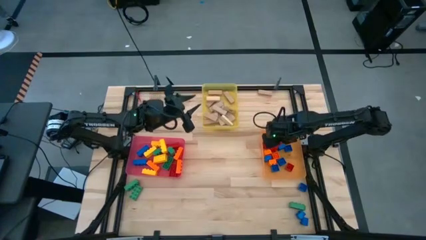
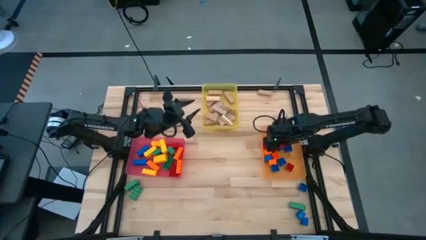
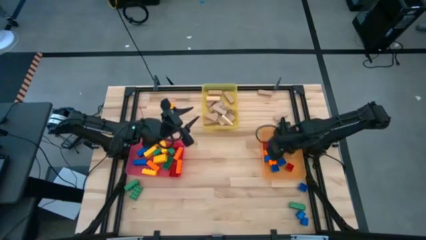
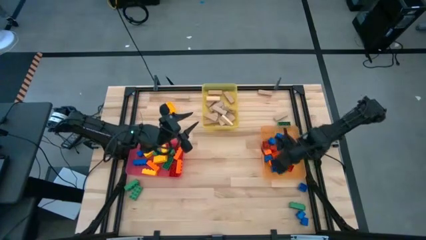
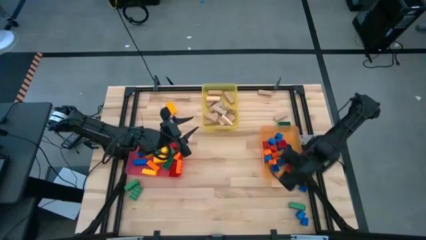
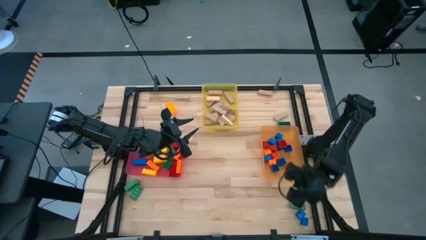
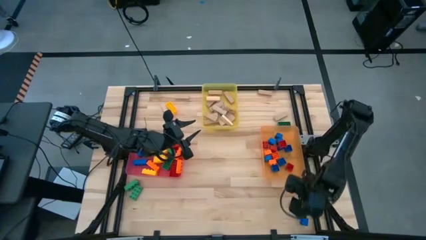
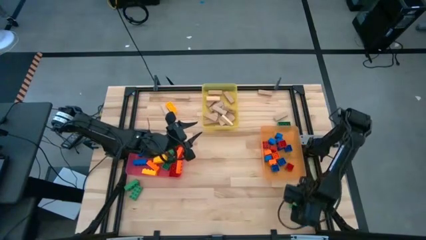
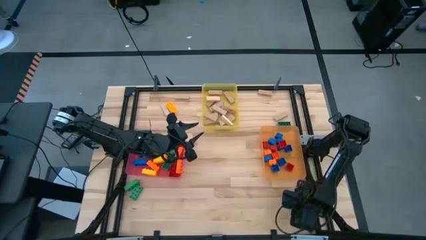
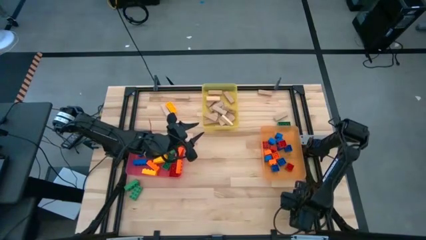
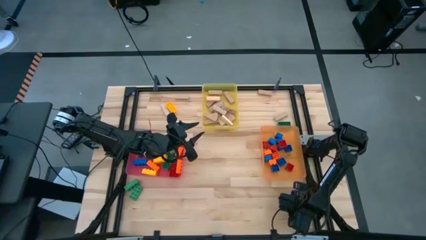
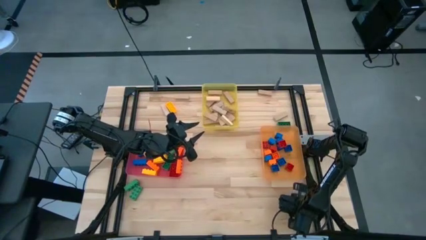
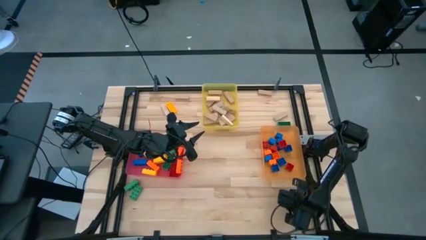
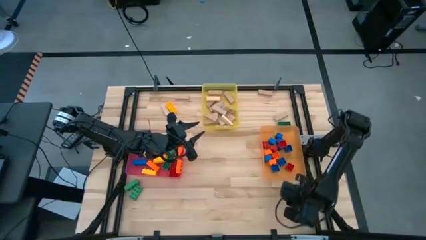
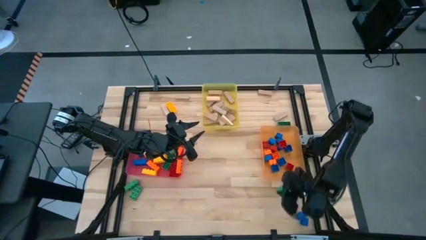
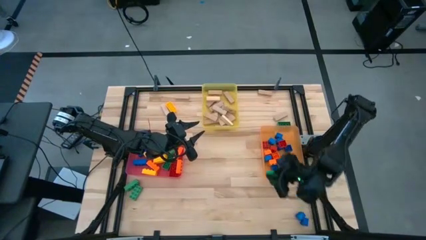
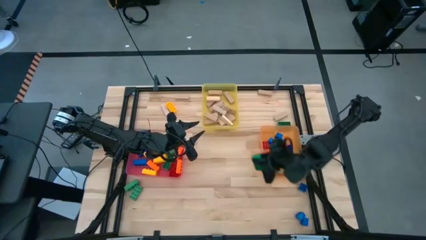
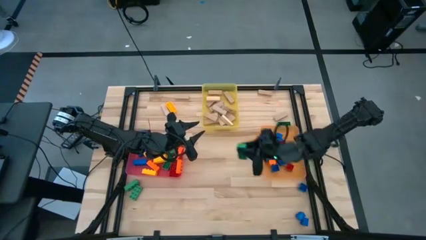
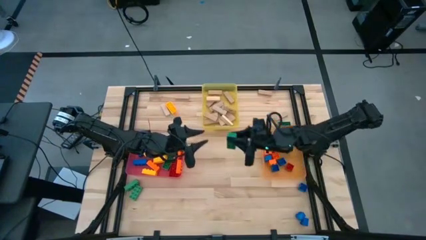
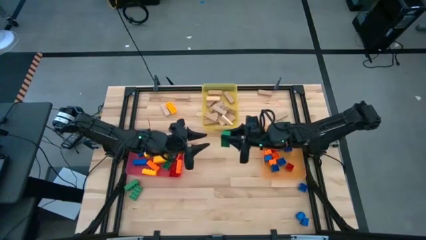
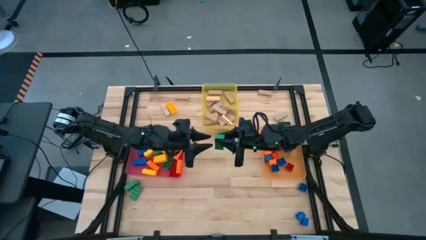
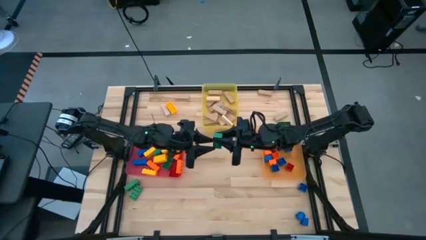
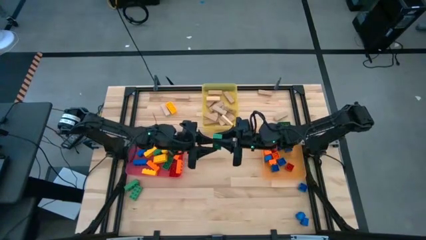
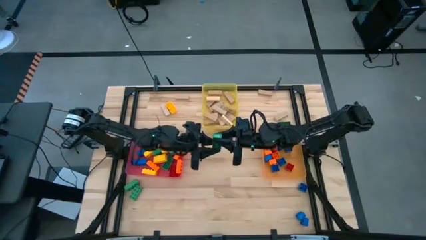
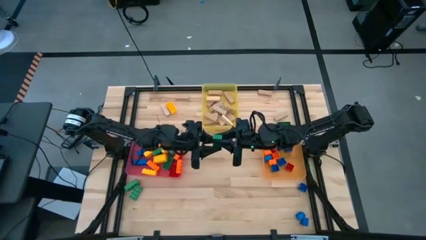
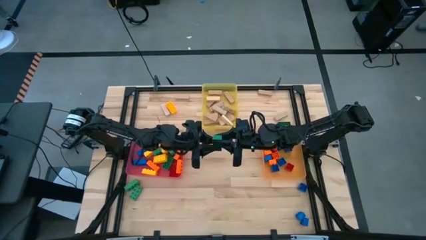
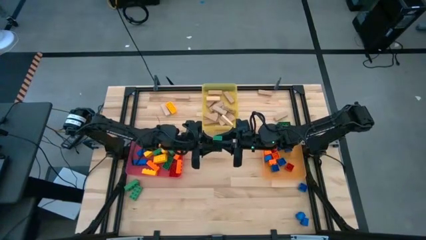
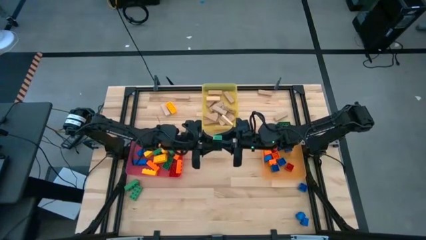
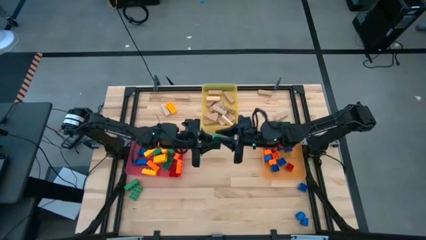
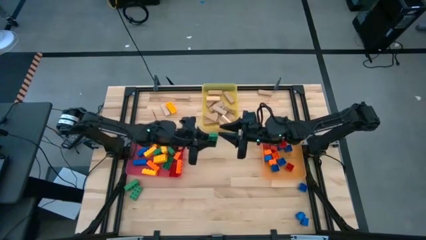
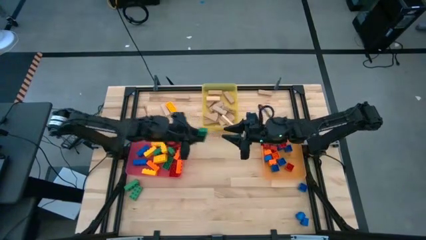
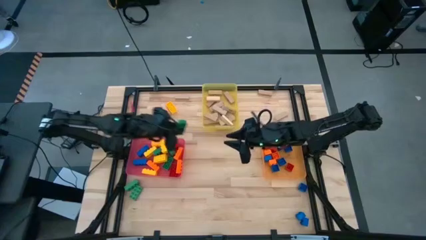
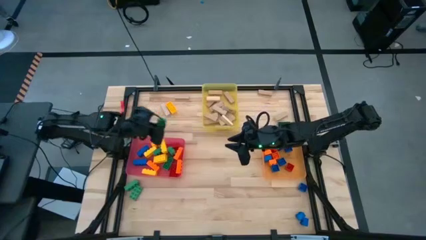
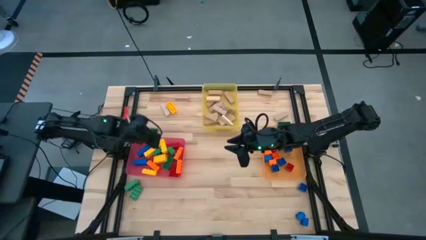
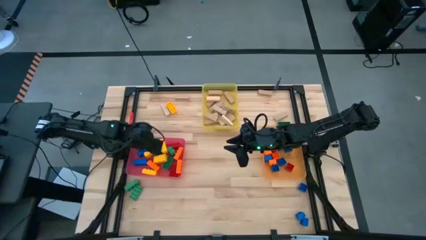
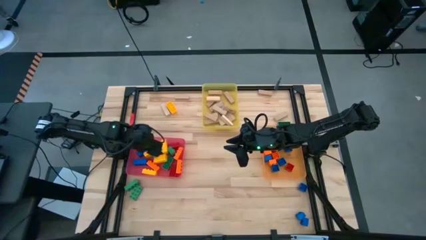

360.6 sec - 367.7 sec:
Task: Sort blocks by size
Put the 3 stud green game piece into the pink bin

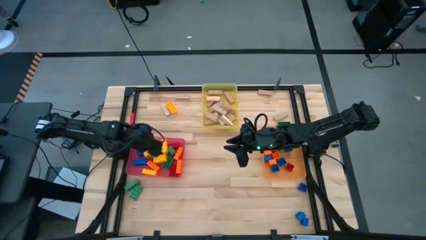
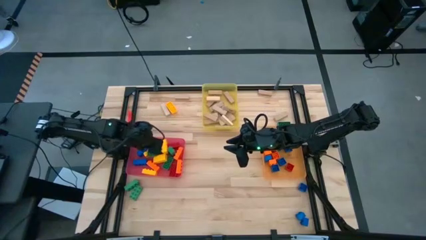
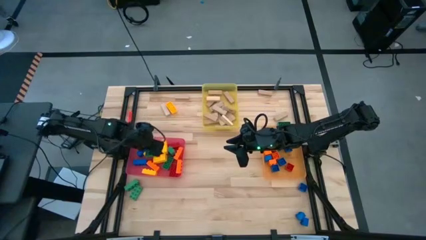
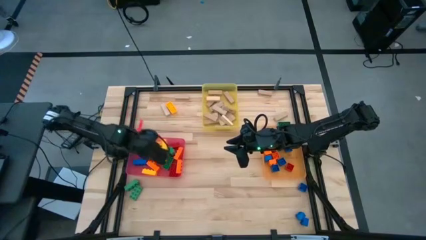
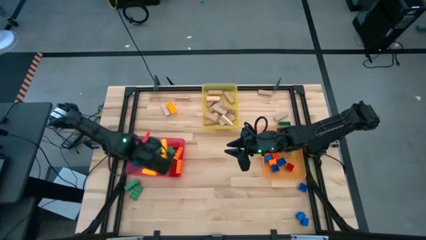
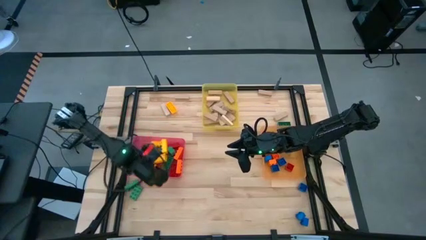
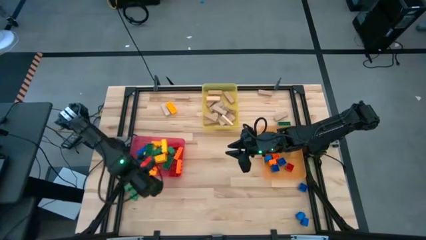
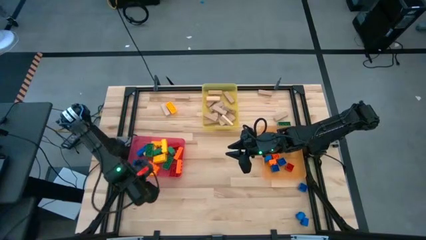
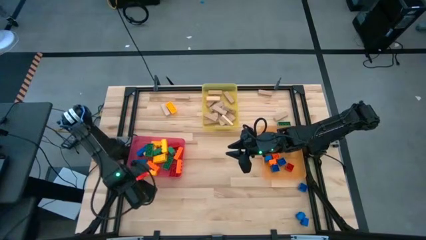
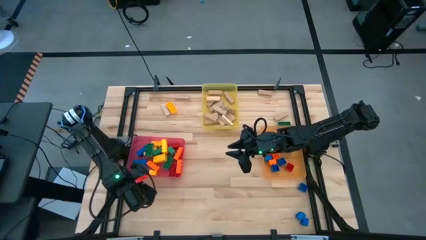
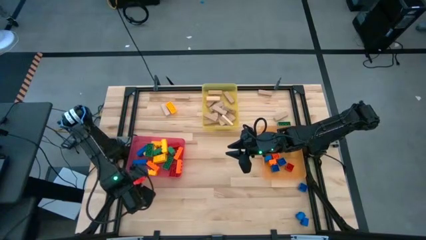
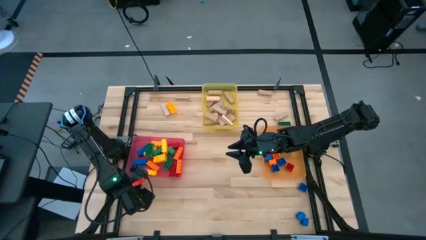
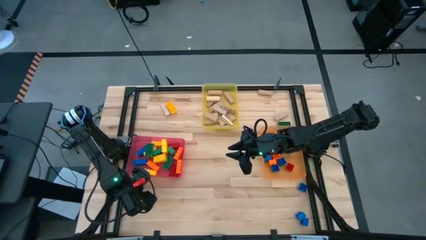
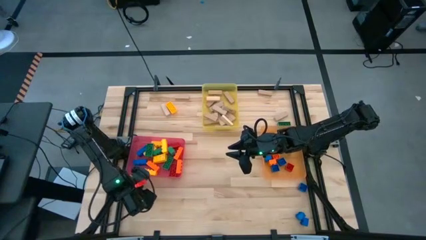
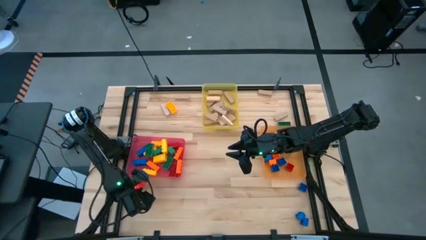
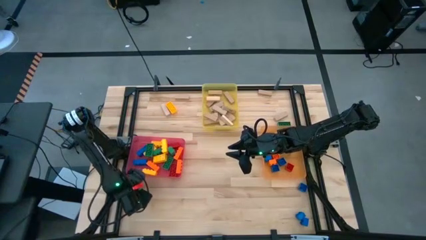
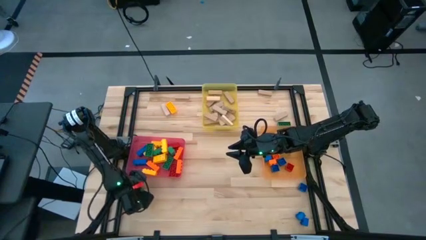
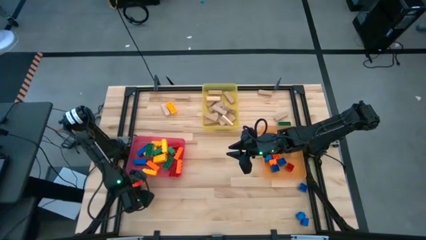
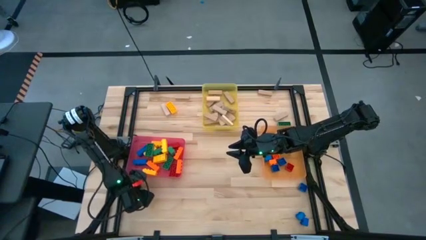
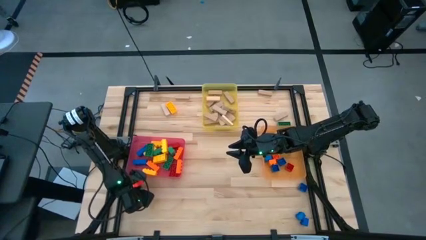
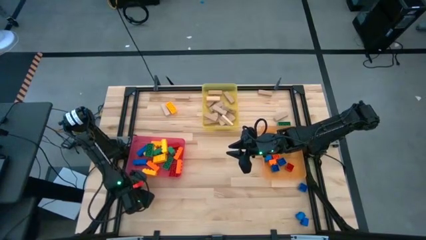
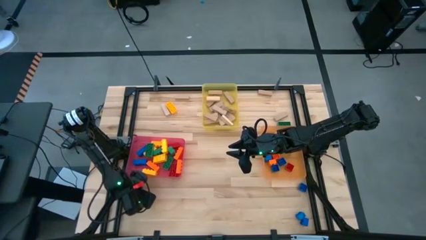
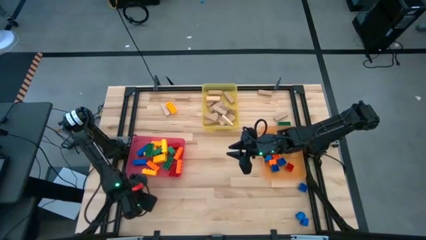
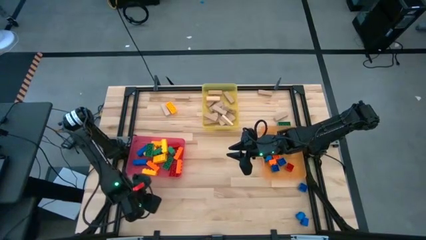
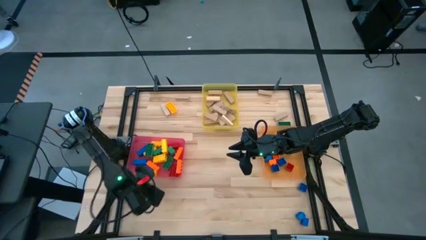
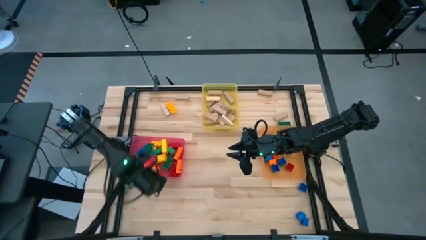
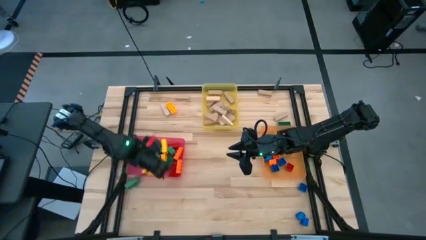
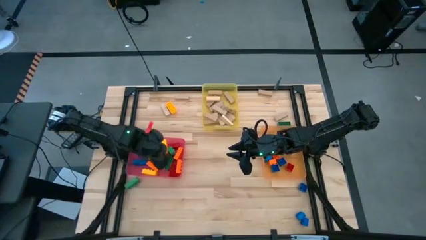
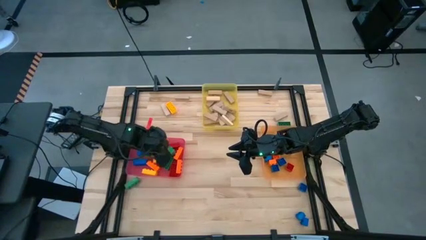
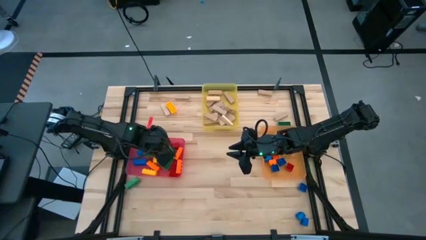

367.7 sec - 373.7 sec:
Put the 3 stud green game piece into the pink bin

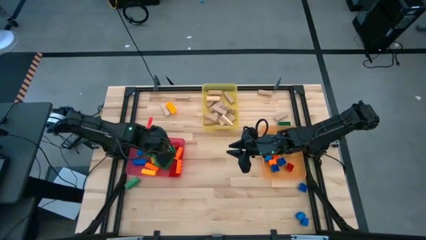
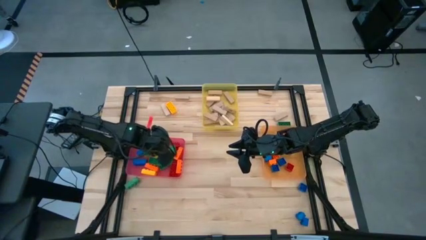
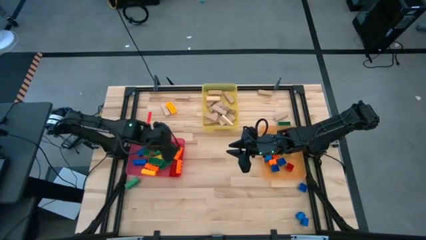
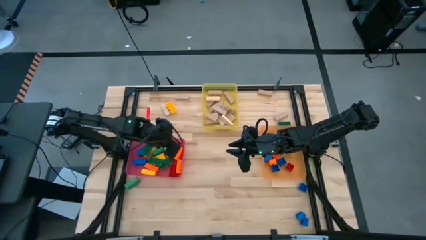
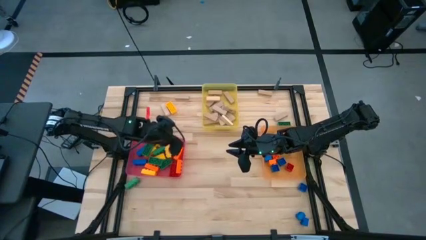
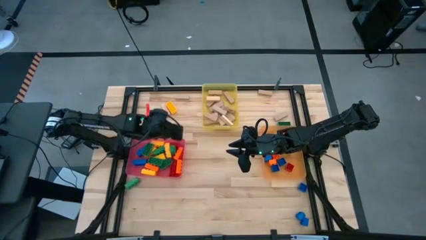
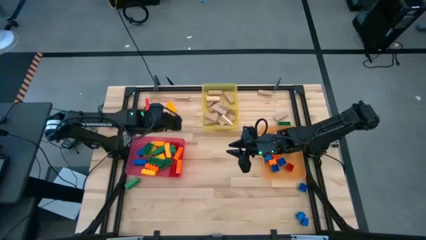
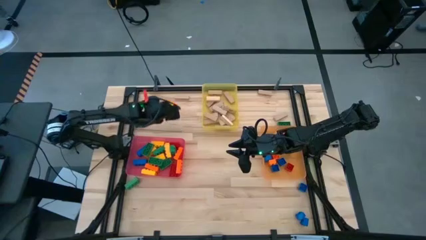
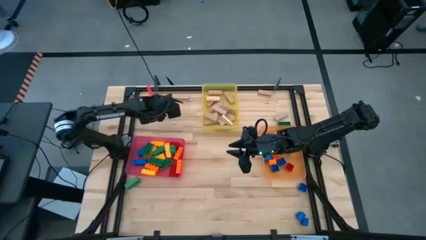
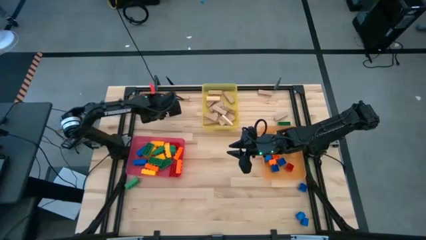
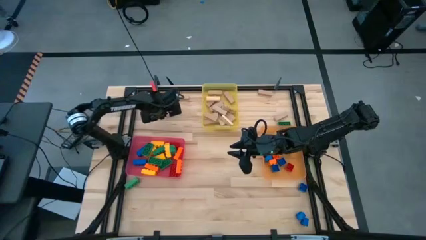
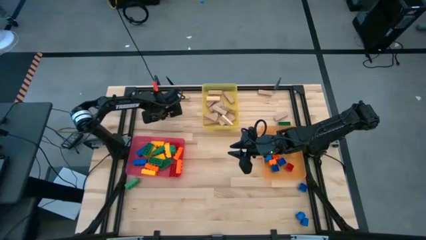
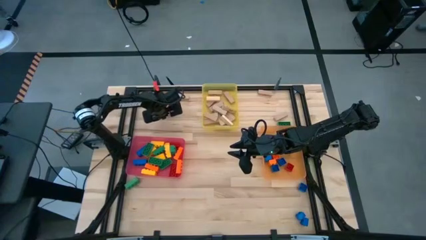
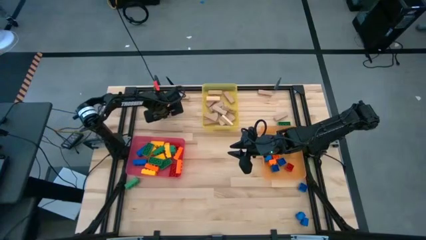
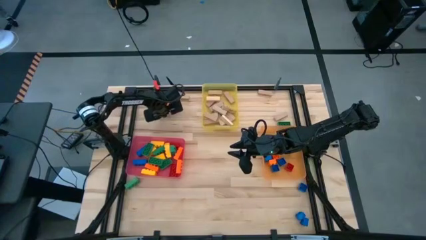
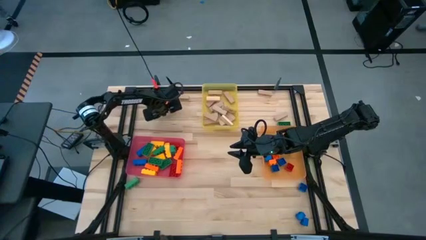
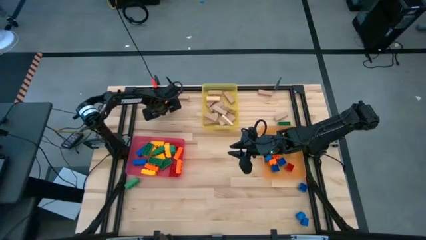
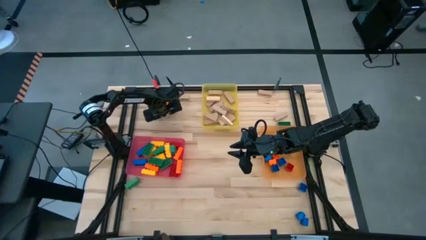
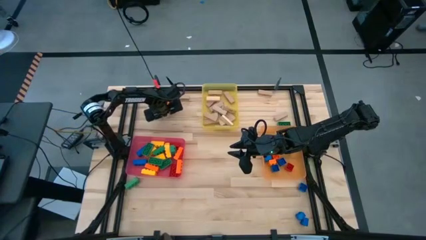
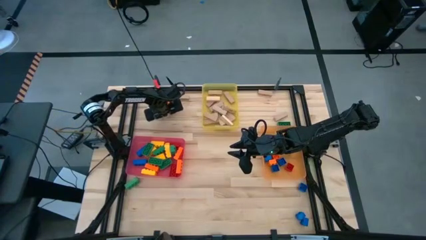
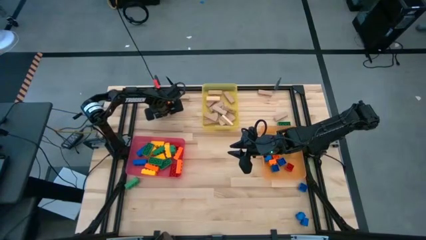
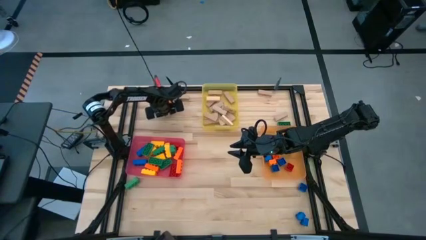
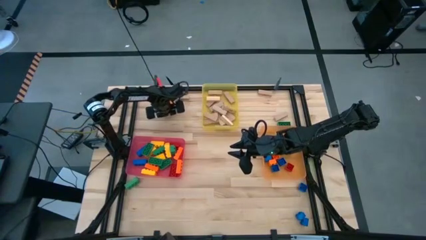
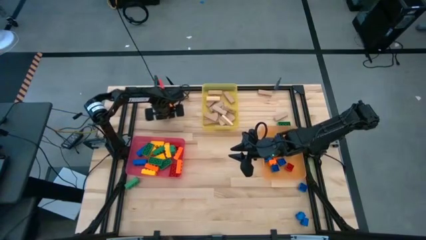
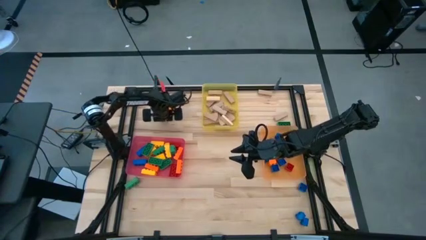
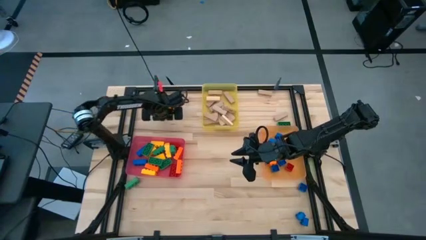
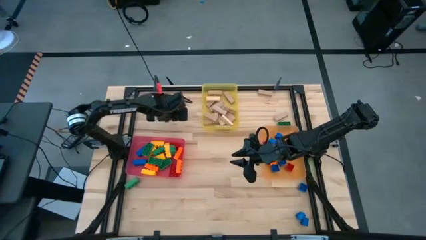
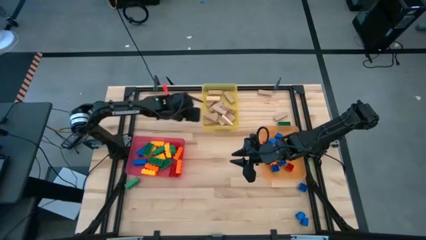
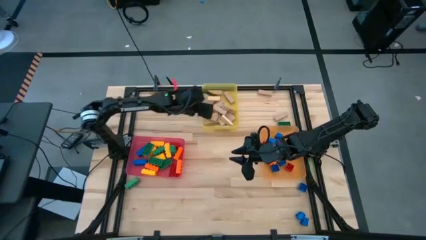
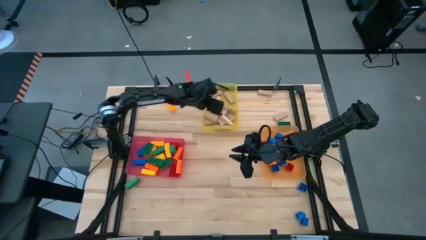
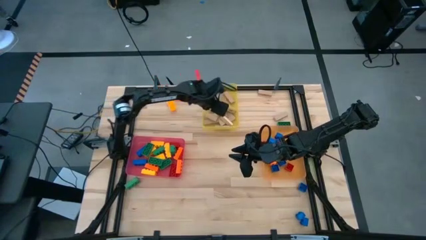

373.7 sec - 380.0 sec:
Put the wooden block into the yellow bin
